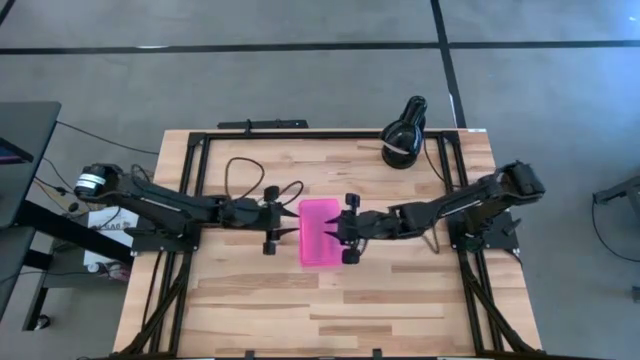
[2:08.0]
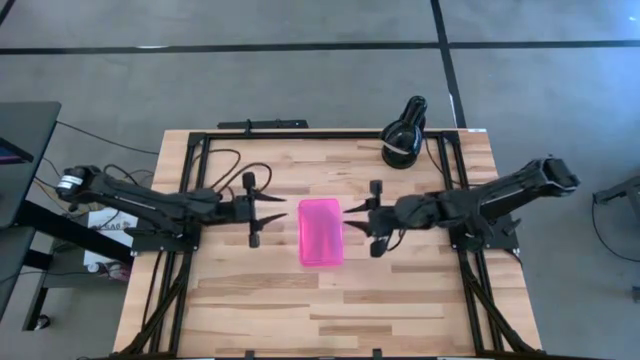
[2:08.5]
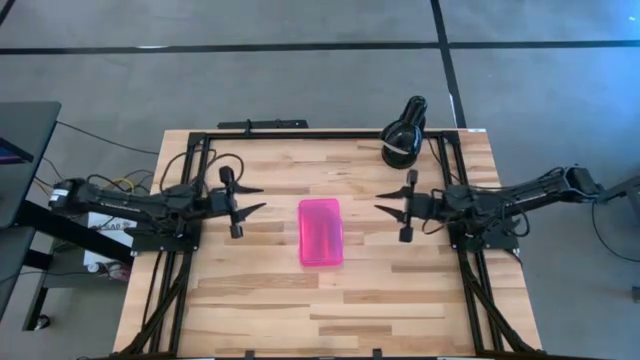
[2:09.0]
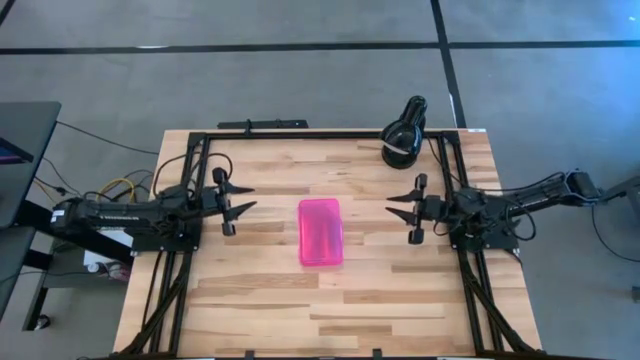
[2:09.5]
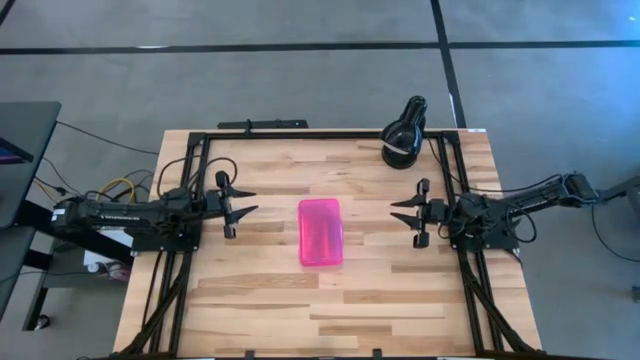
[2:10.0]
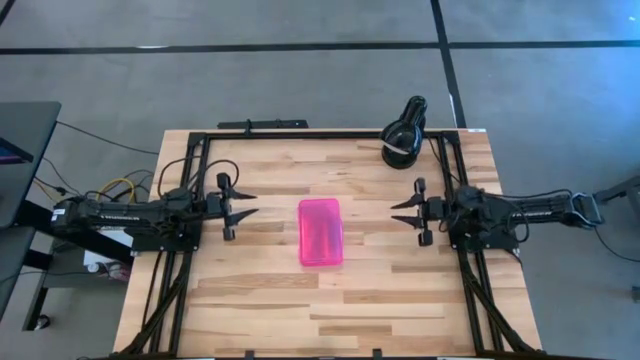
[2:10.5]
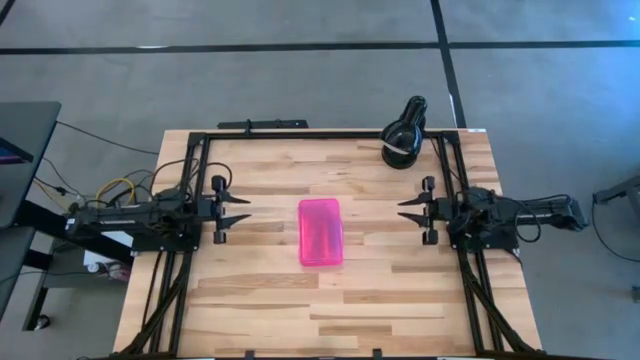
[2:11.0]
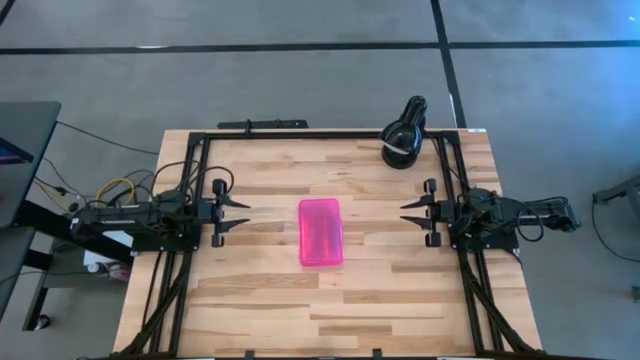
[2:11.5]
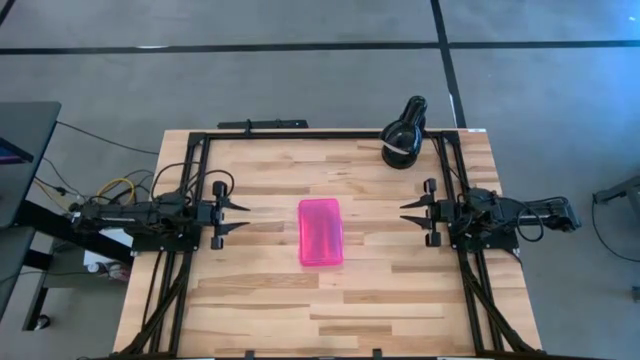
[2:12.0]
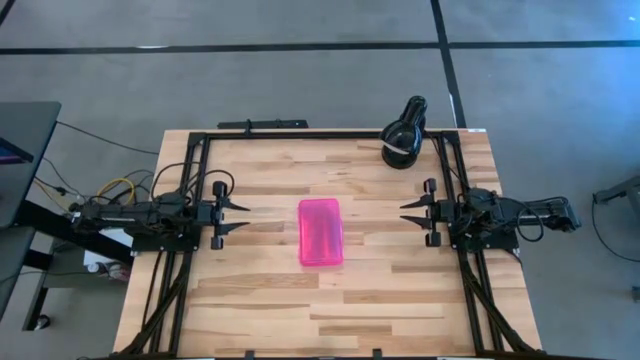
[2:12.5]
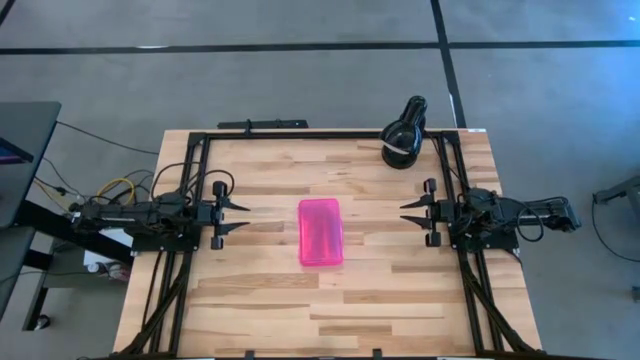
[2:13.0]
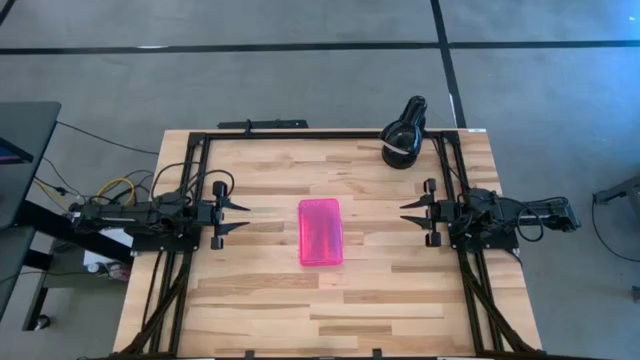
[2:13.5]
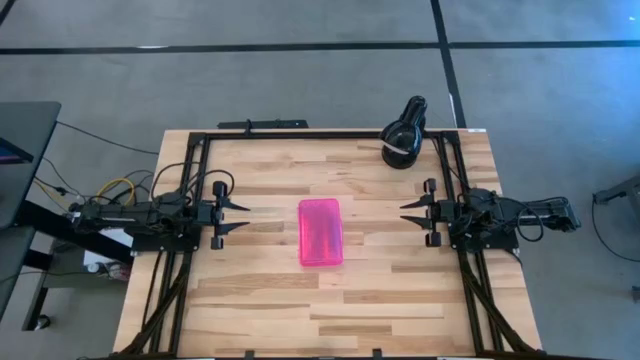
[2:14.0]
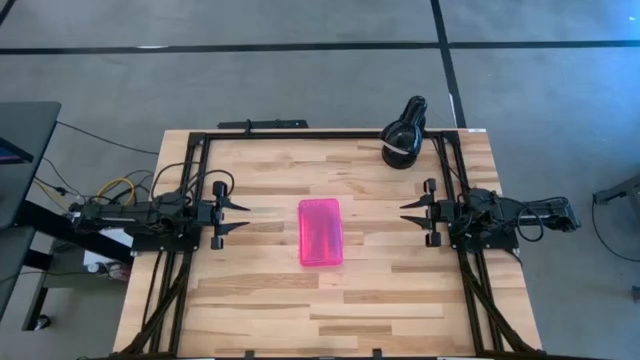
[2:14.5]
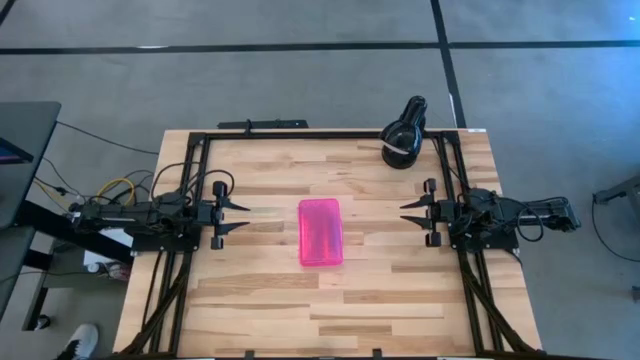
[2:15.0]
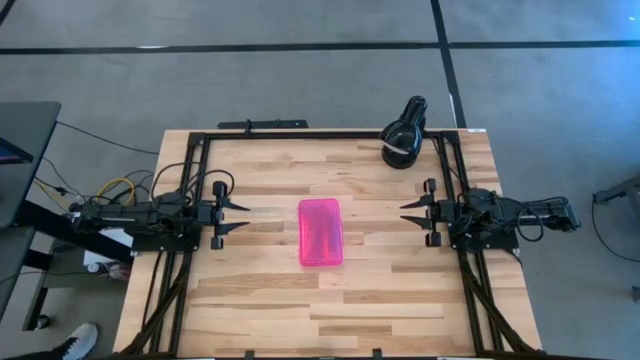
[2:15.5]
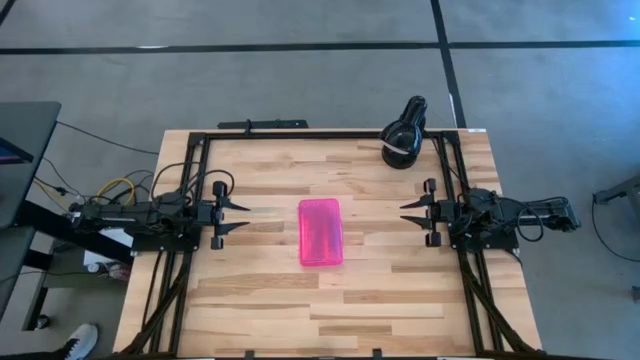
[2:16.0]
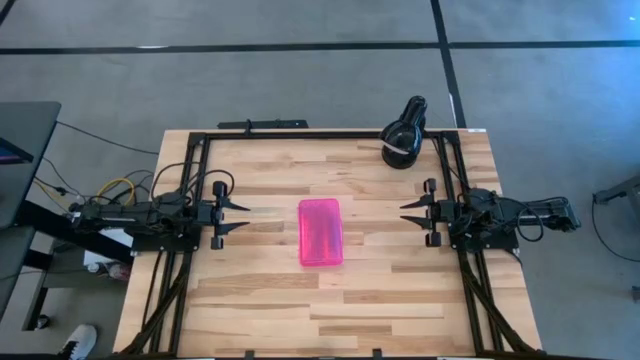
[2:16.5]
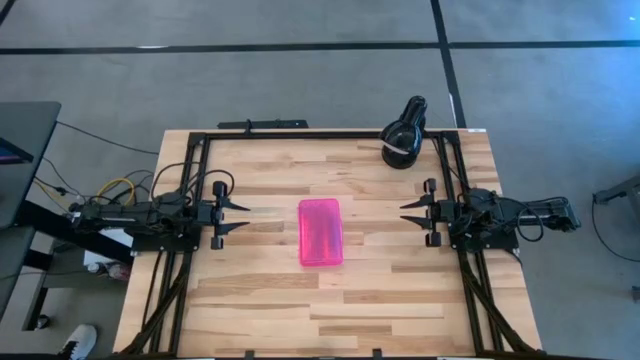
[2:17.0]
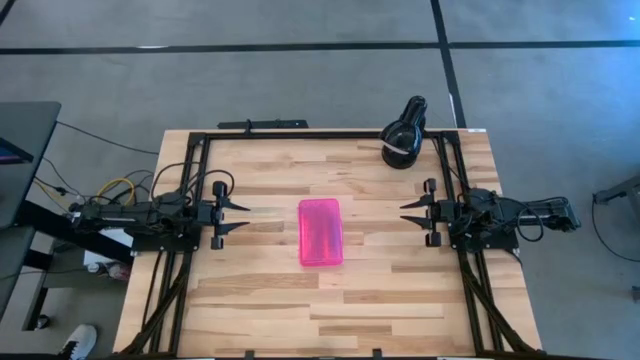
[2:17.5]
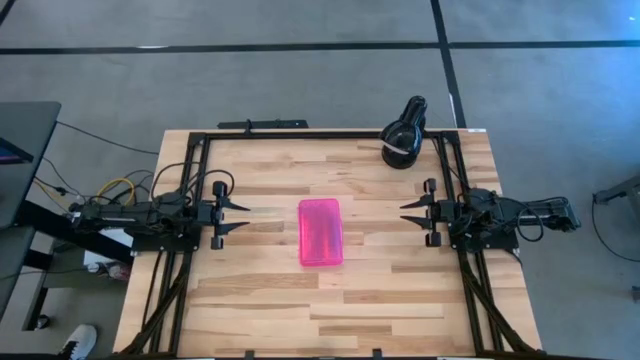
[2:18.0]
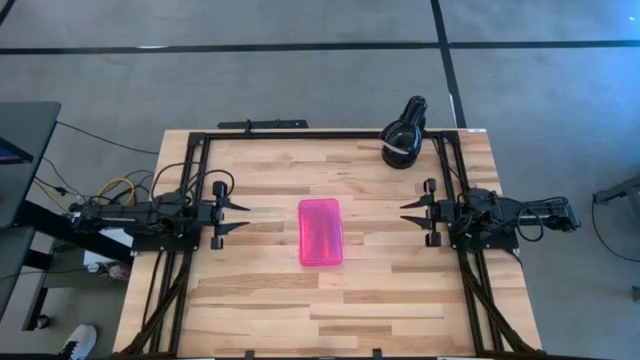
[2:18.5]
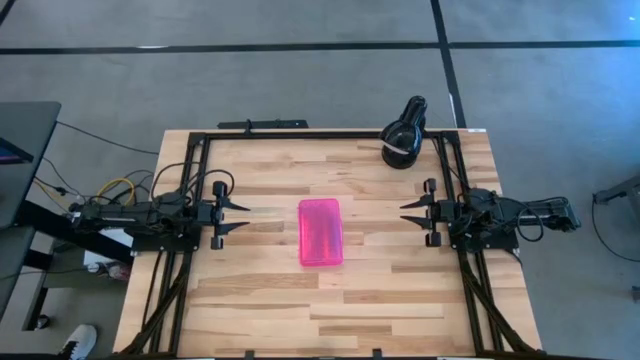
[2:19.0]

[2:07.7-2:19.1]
Task: Pick & place school supplies into a supply box
Return to Home Position

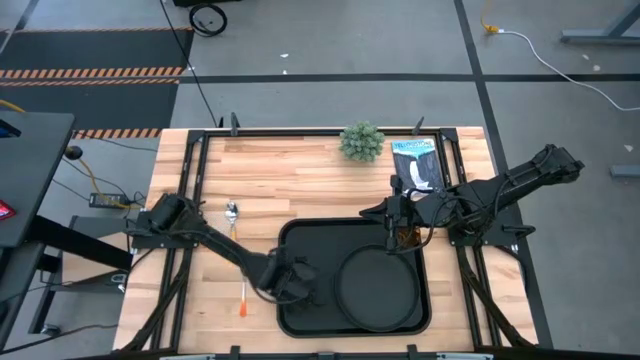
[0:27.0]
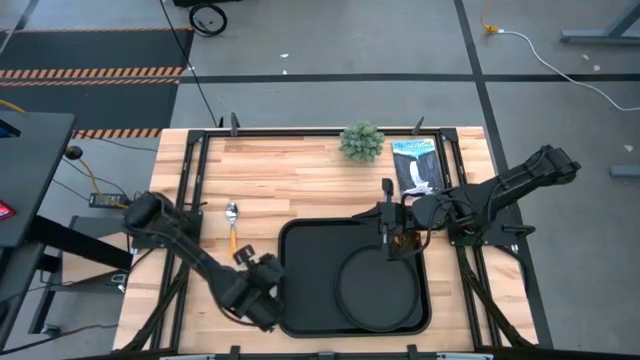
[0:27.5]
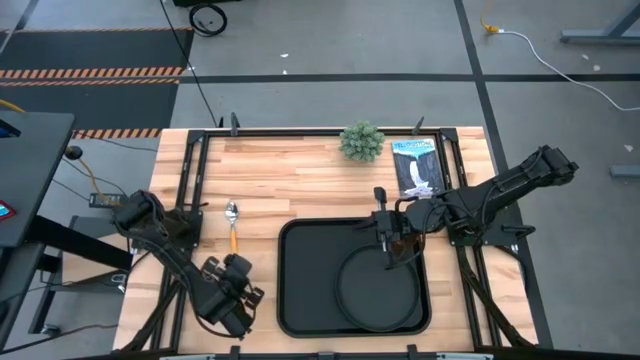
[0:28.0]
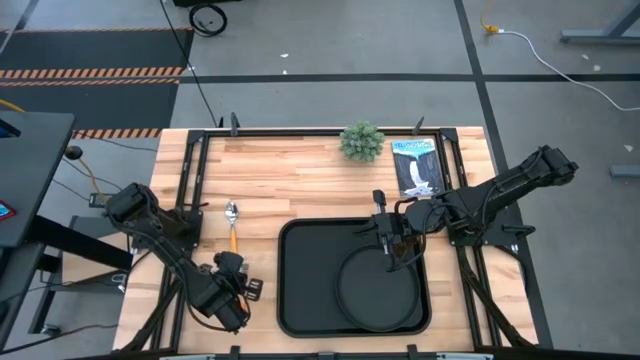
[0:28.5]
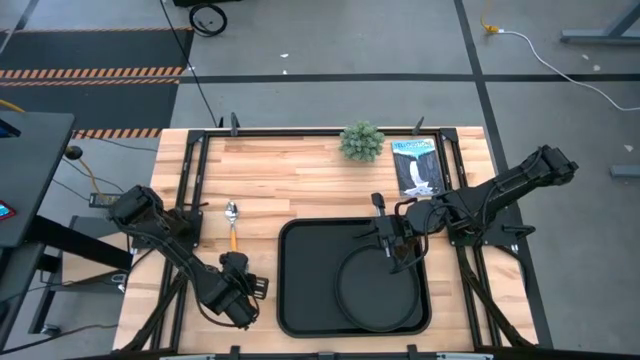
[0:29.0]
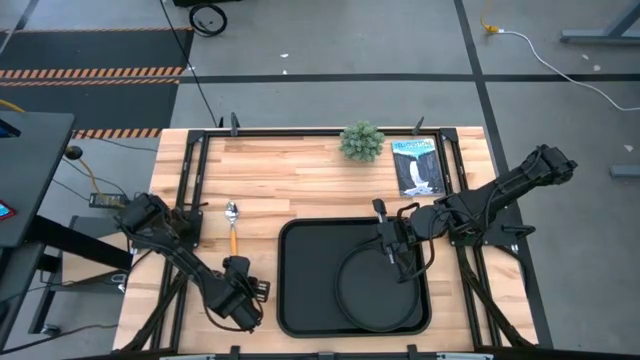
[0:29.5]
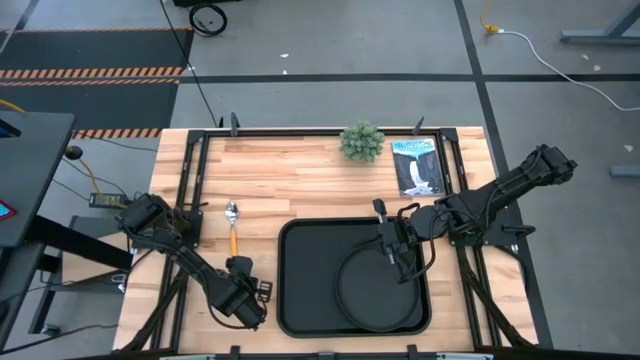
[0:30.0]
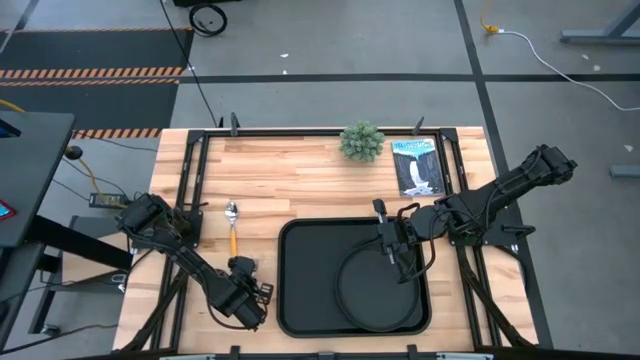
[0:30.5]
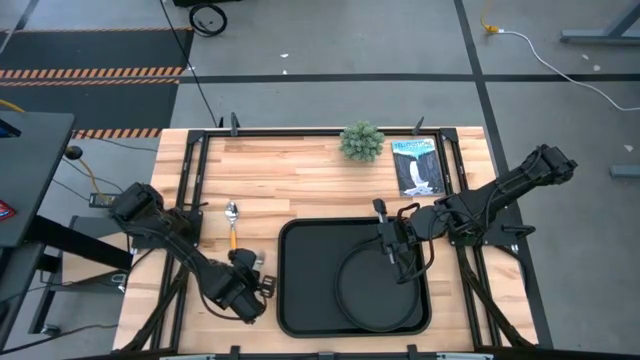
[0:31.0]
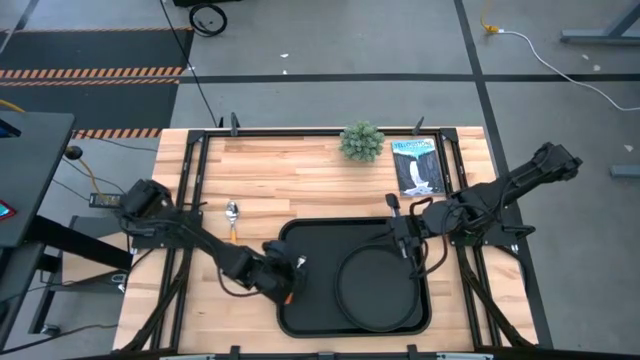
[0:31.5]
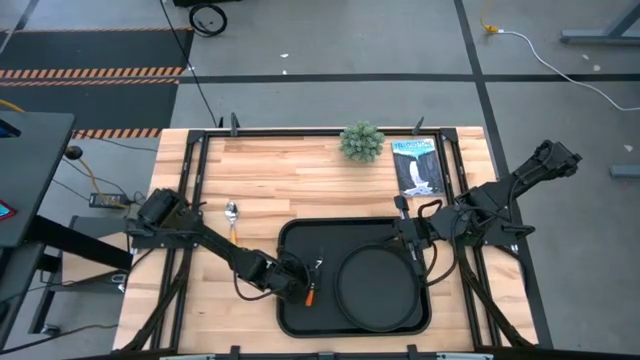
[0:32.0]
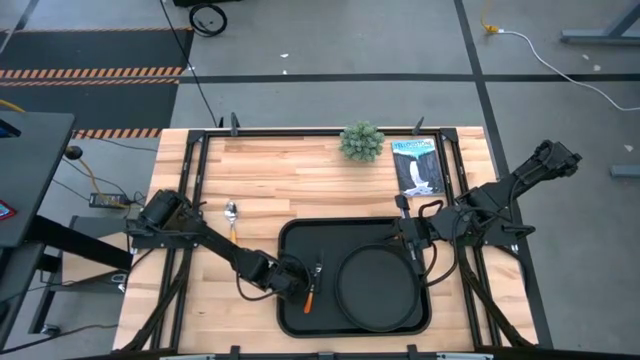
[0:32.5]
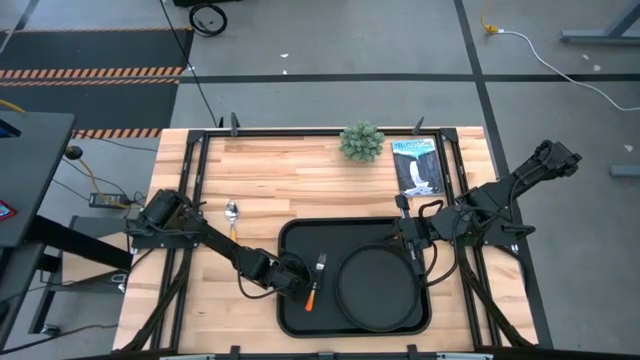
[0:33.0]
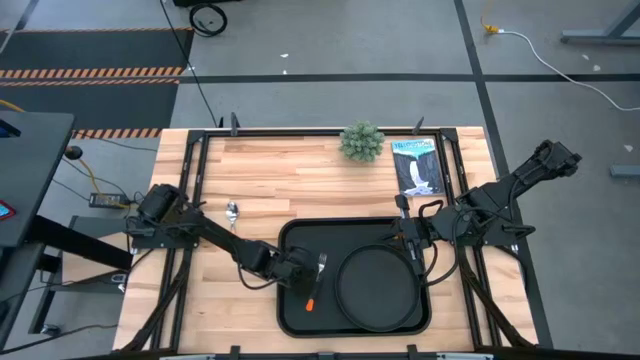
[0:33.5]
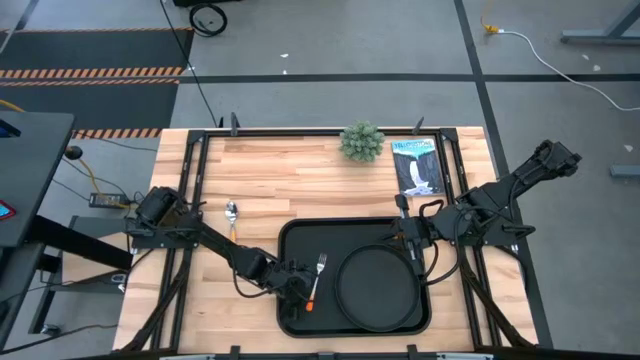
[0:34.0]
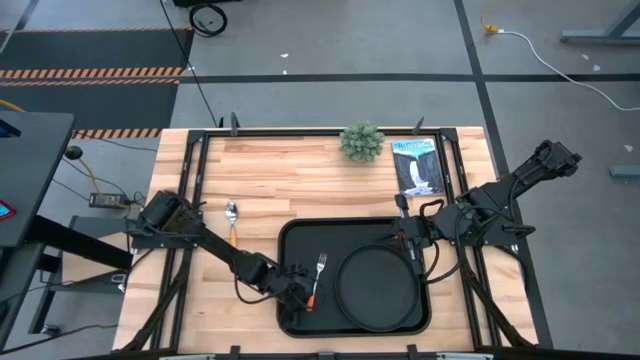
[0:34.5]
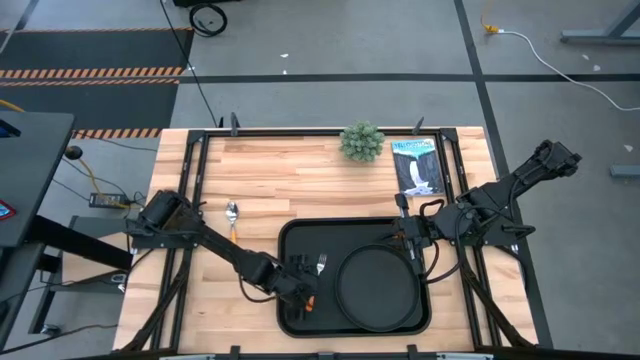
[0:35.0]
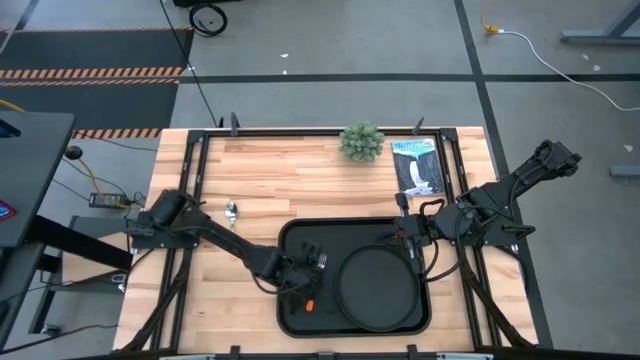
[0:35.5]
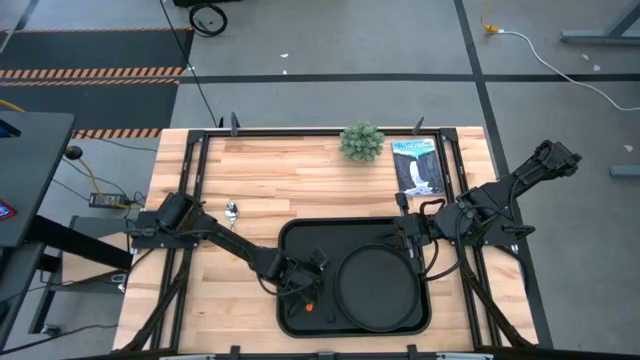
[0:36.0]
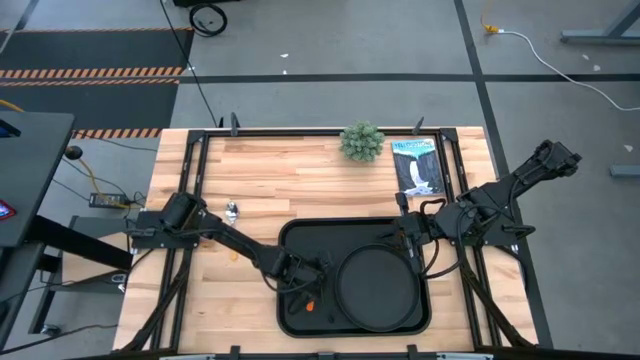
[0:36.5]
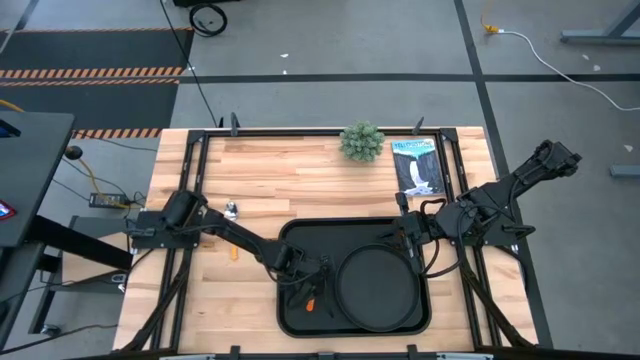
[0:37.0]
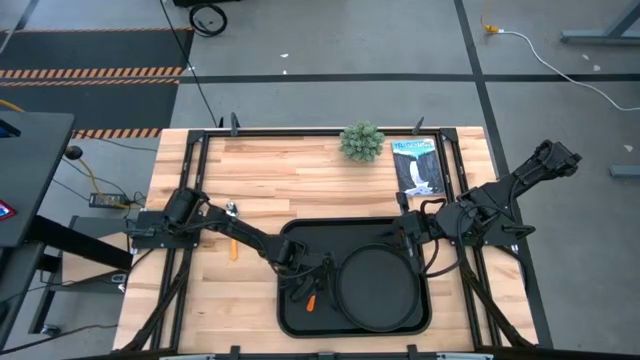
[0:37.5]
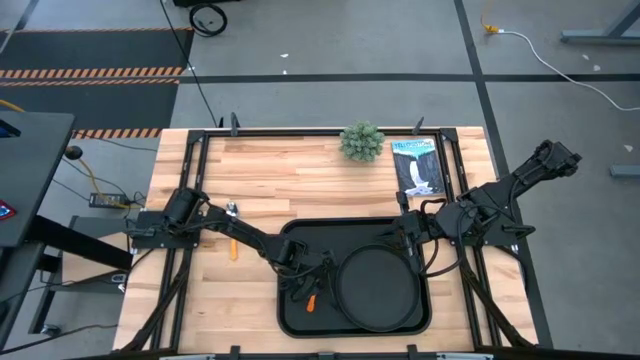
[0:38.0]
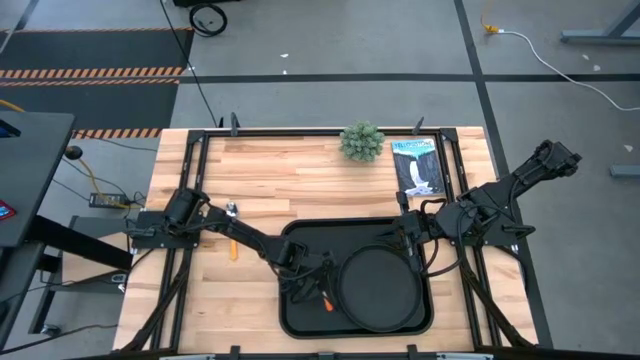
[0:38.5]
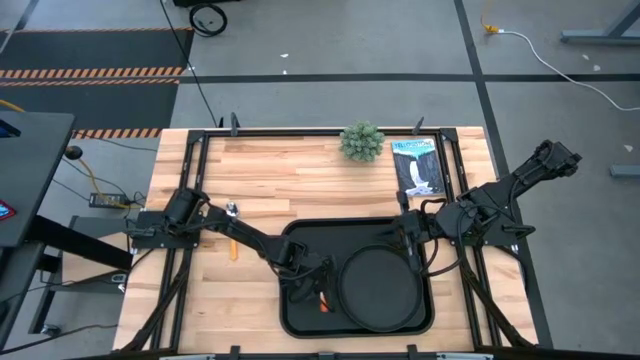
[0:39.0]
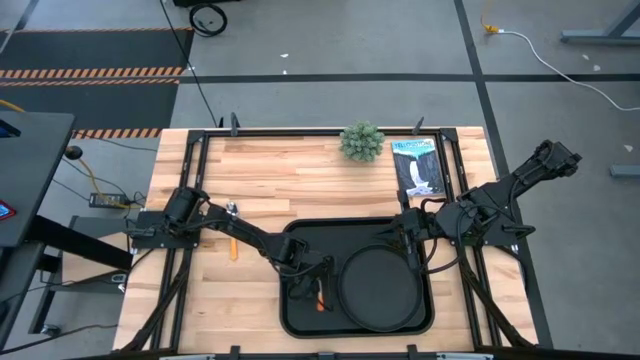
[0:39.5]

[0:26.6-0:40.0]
Task: Pick and place plate/cup/fork/spoon on tray
Put the orange fork to the left of the black plate on the black serving tray
